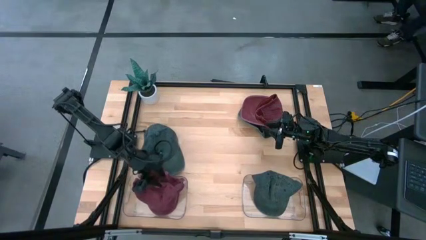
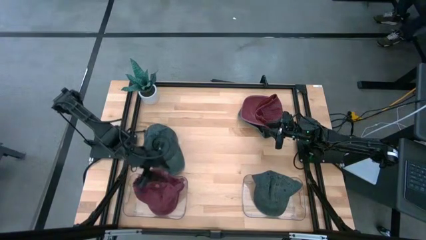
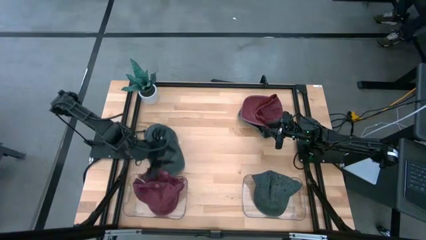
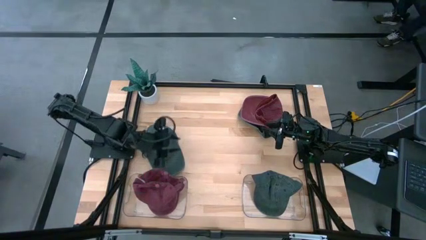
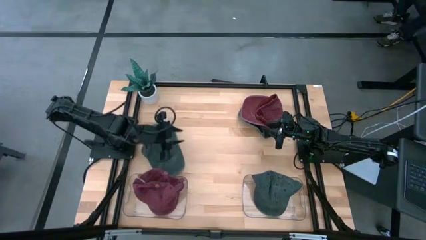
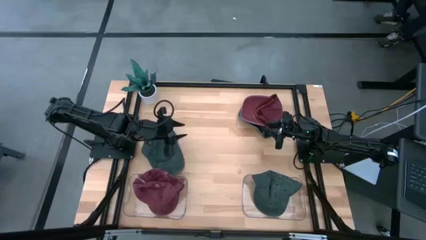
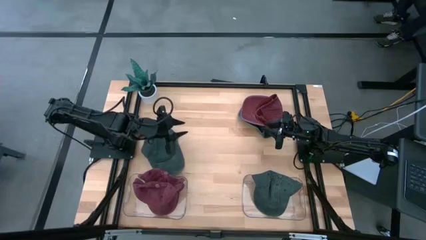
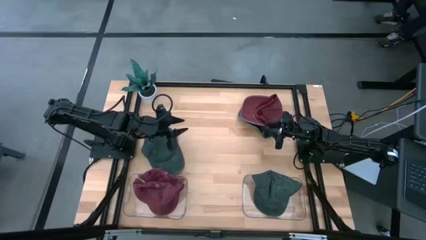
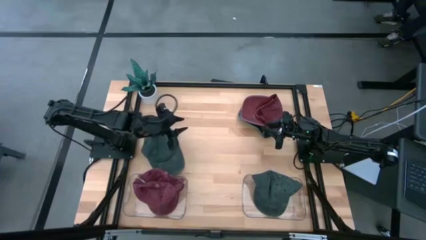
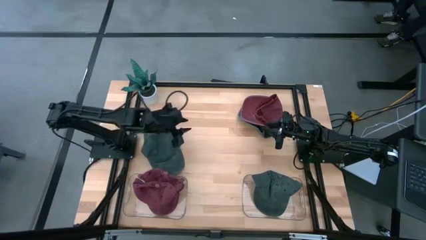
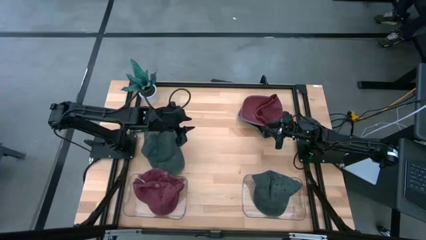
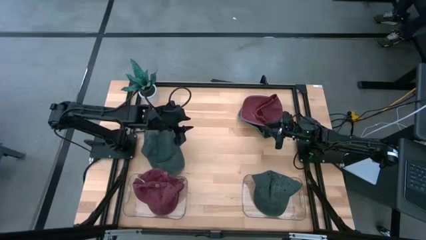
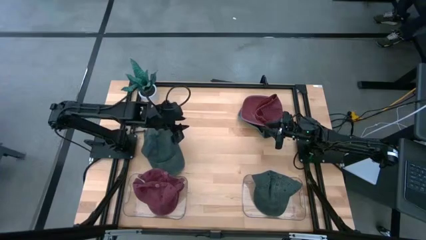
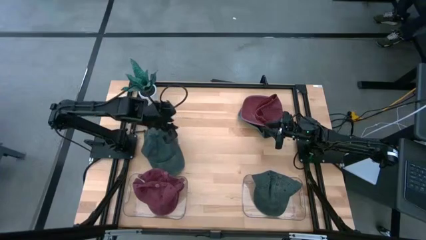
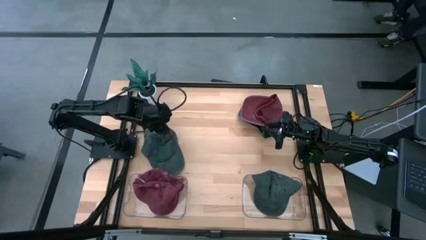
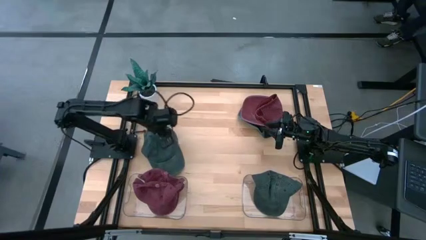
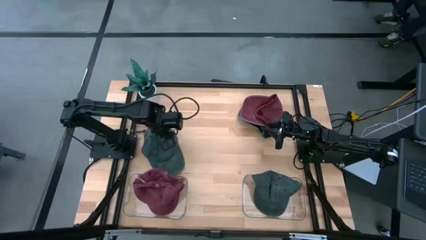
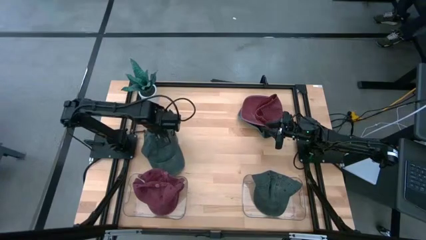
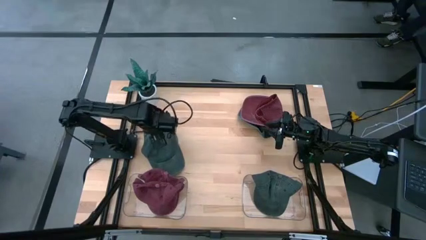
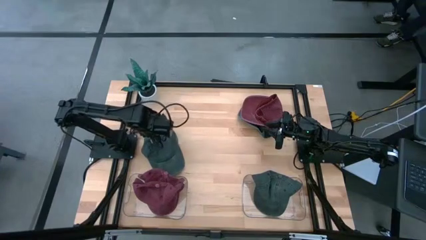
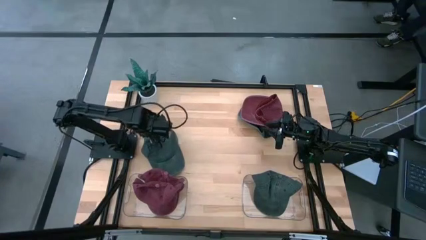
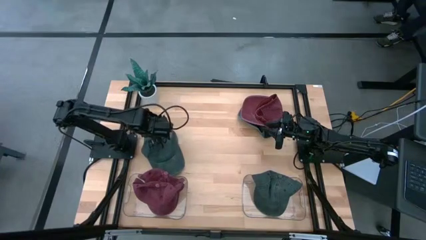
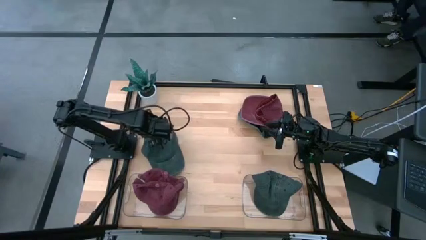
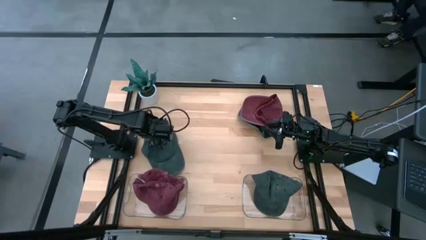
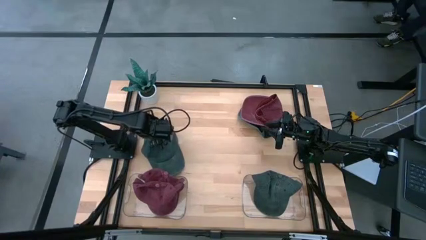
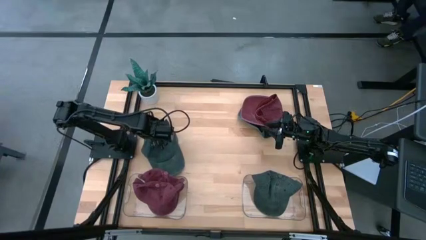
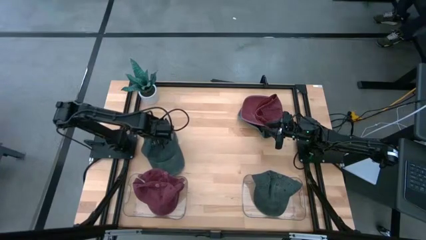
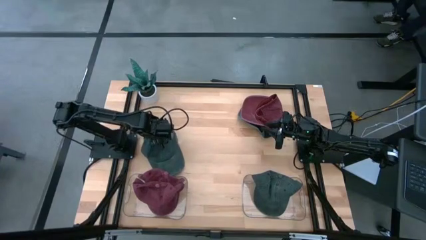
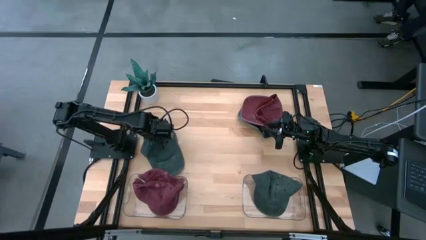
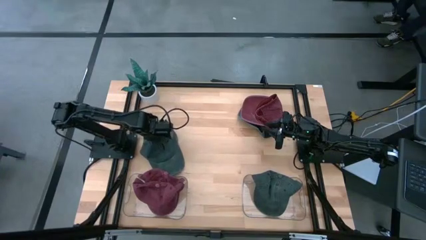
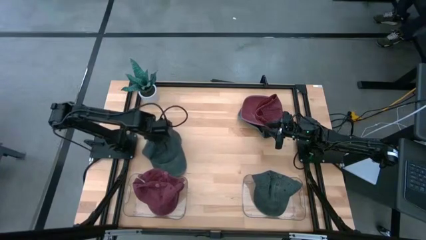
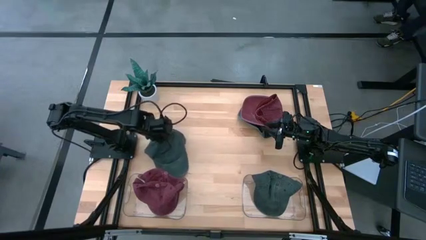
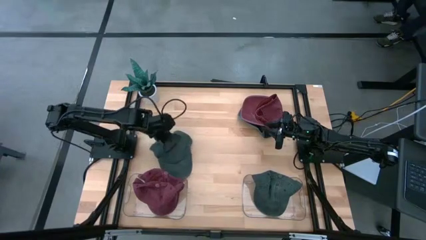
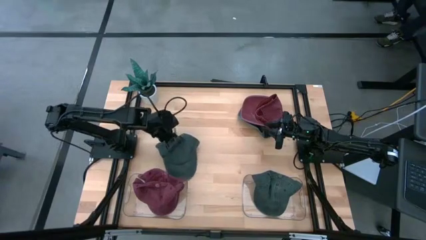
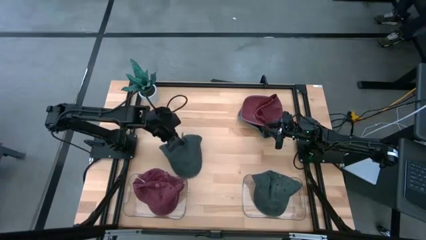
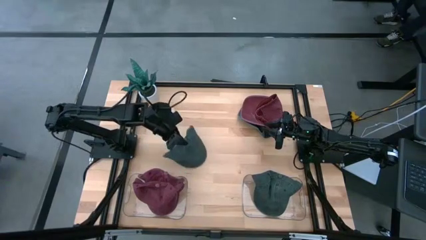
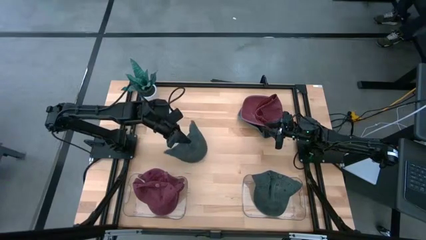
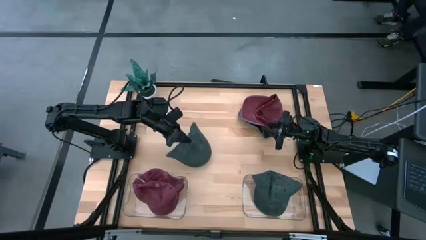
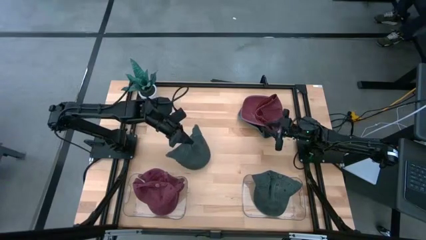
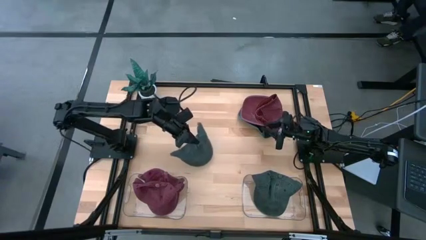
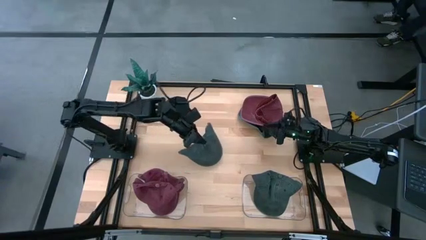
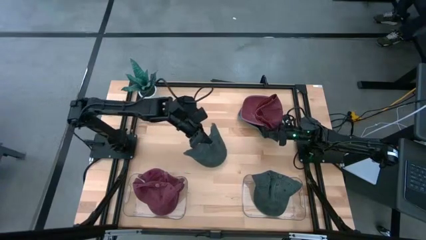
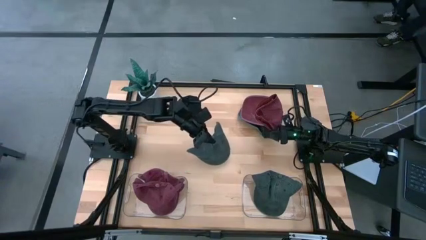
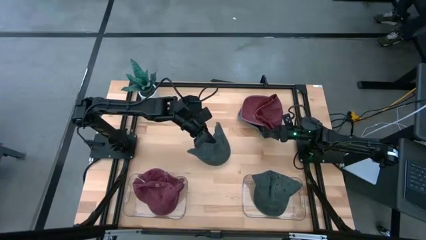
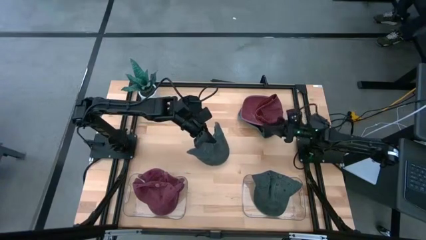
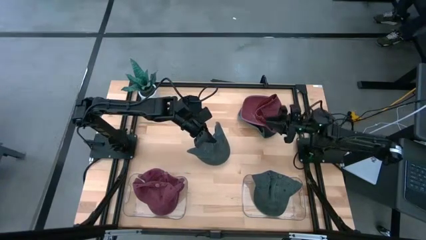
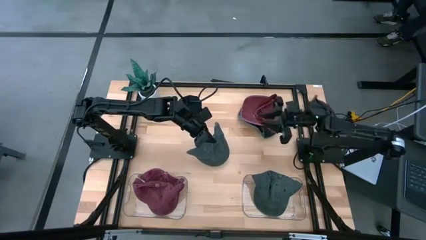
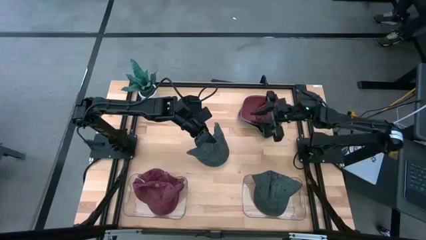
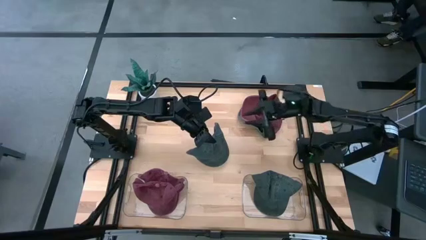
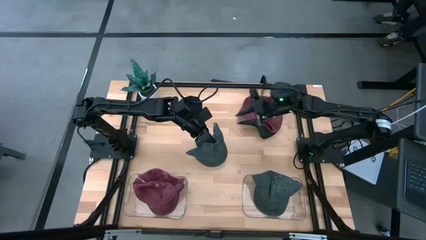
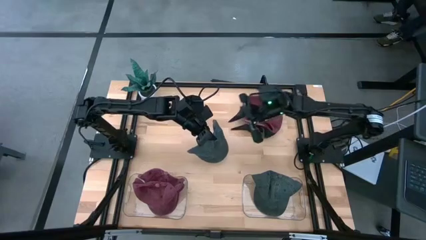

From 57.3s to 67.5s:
Task: Pick & Place hat
Put the bottom gray cap into the right transparent bin

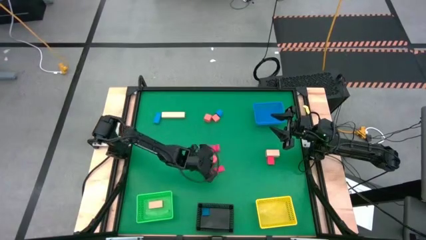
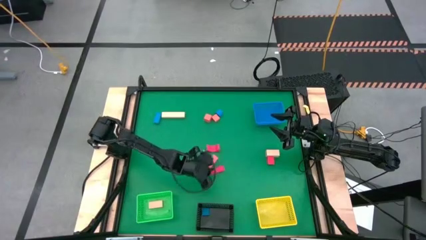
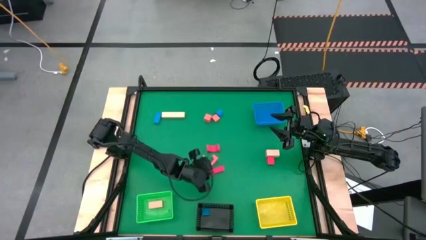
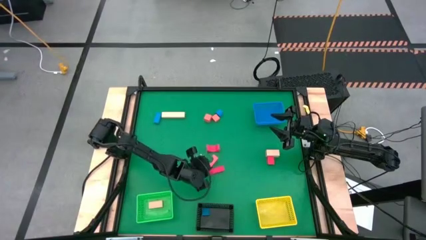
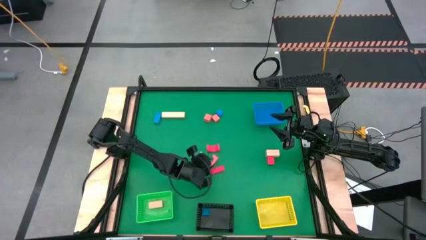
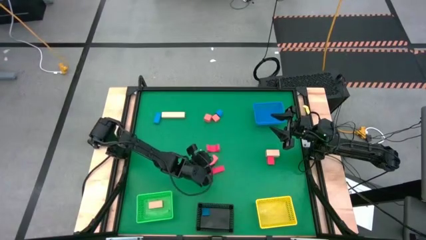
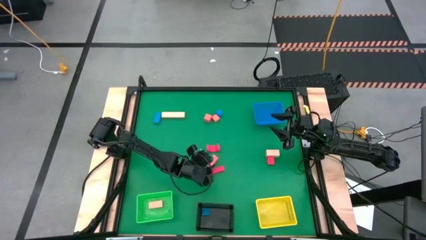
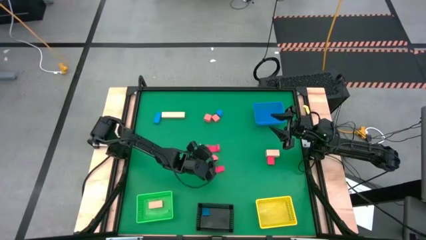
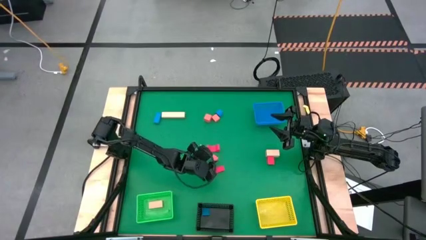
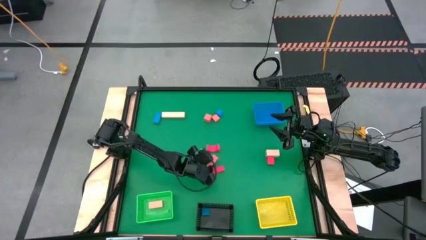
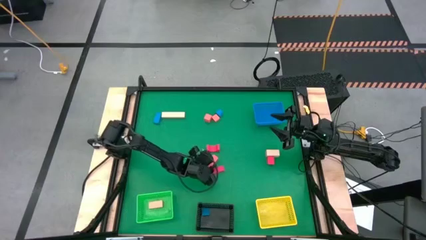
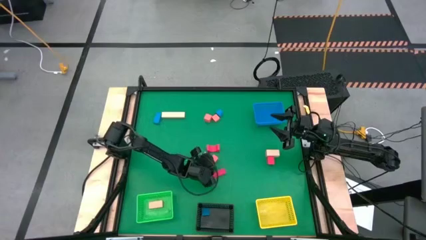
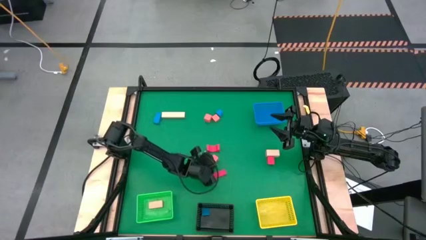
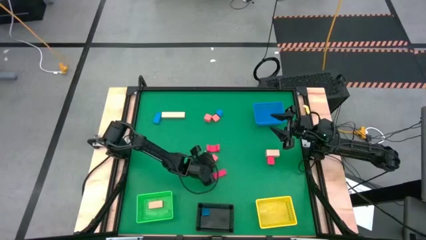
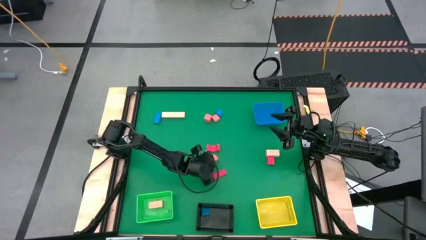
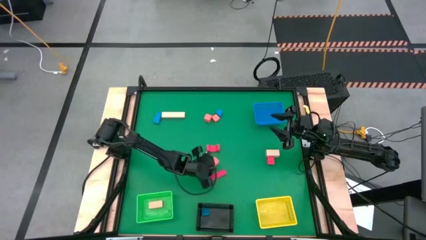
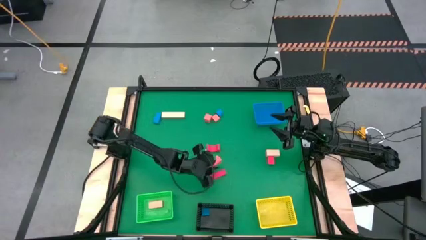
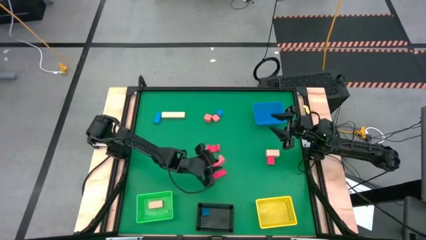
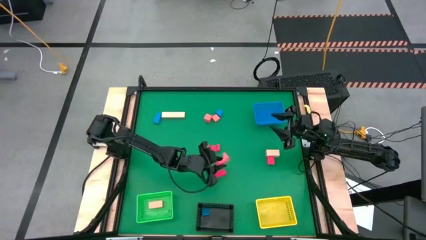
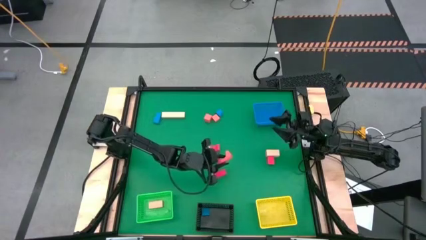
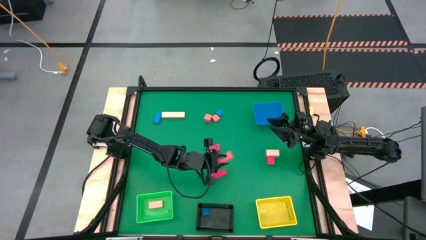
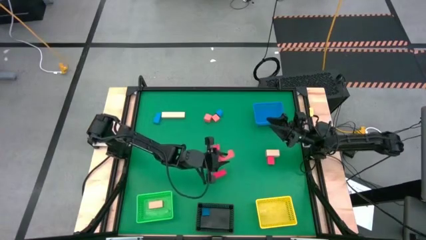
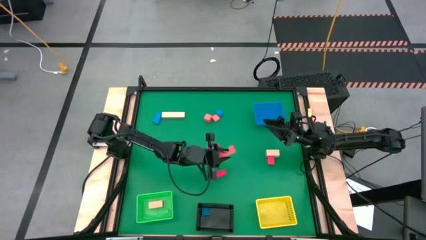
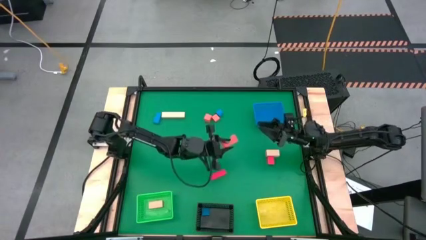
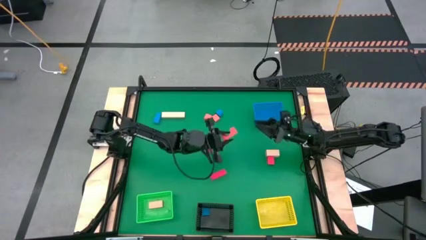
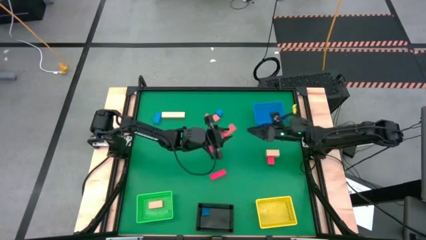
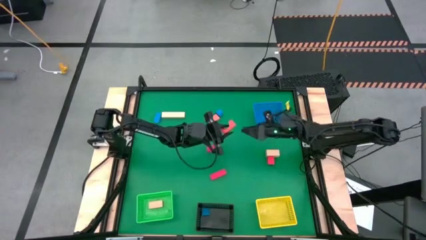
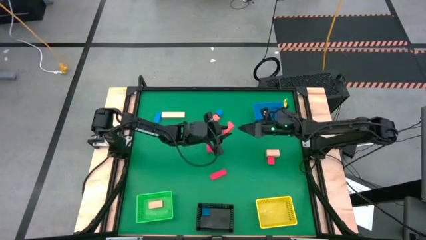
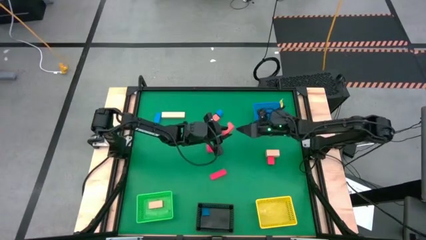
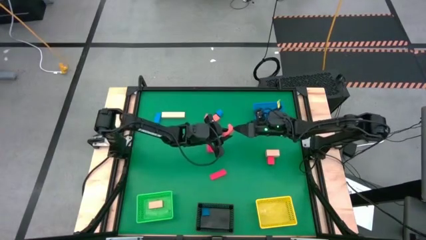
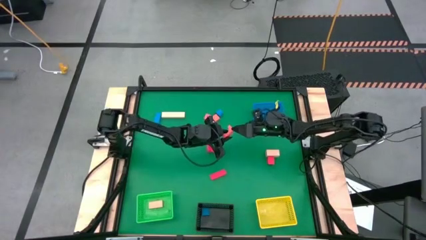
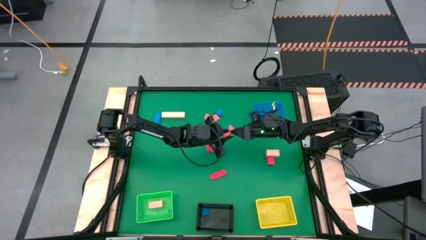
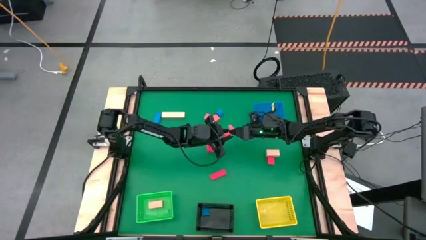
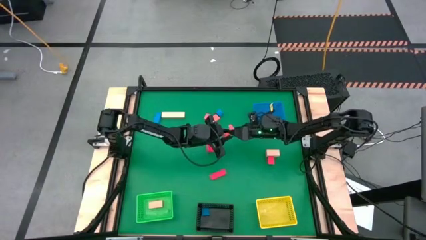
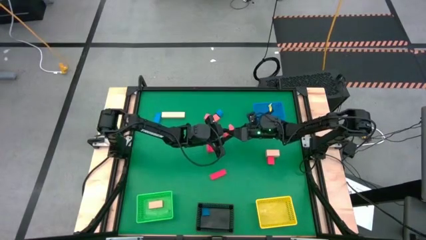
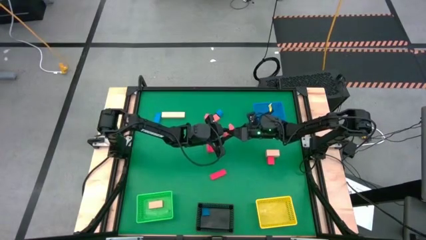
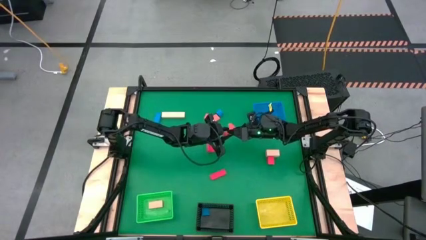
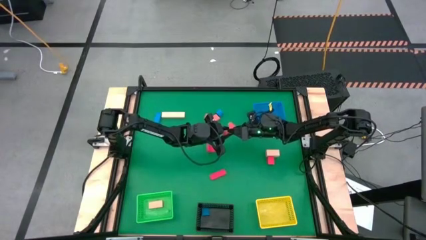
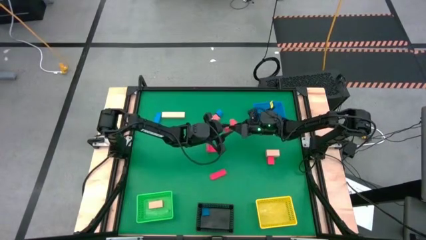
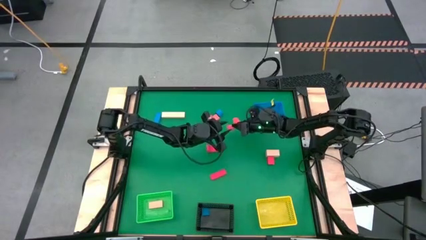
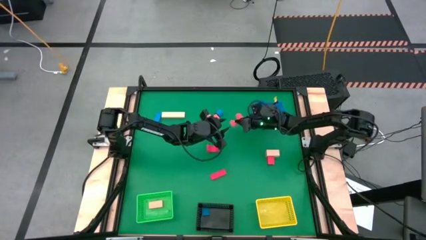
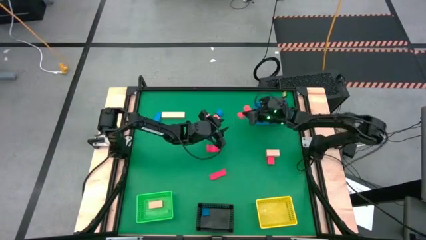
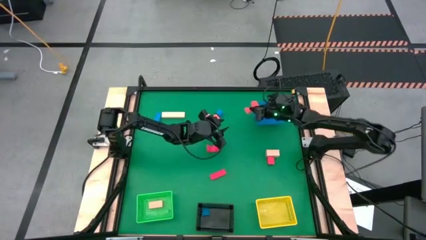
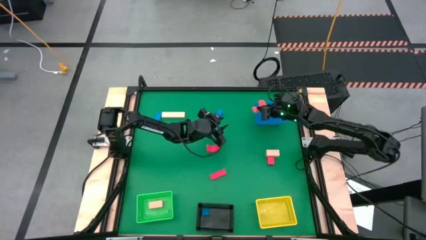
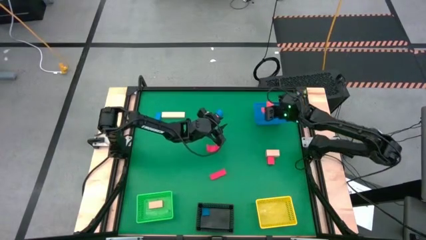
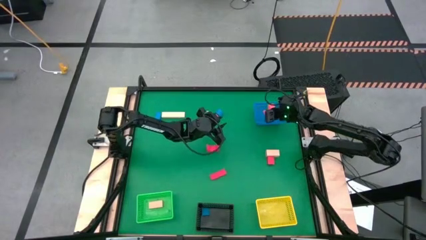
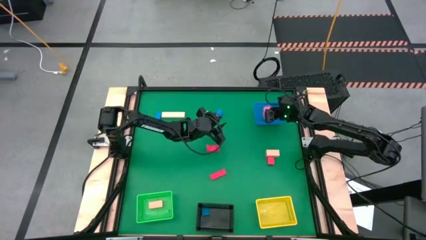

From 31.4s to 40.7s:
Task: Sort & place blocks by color
Put the orange block into the blue bin
